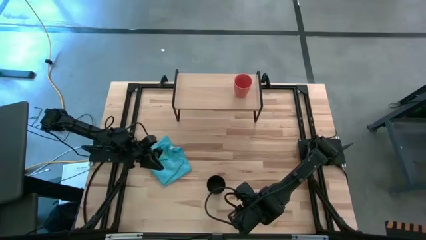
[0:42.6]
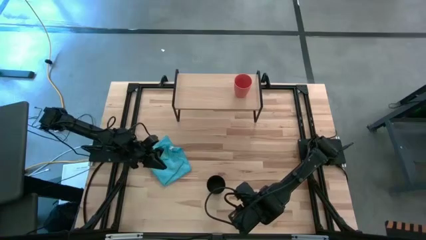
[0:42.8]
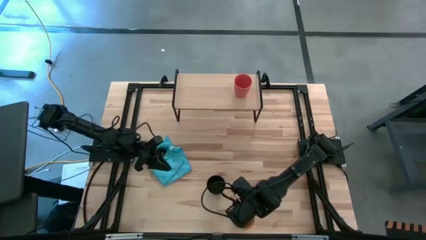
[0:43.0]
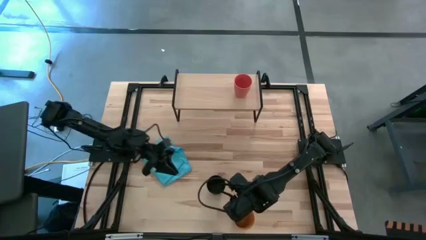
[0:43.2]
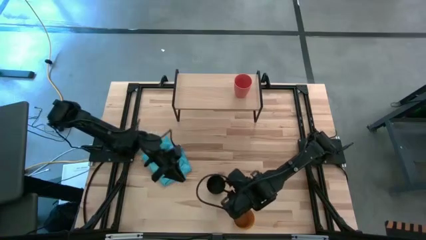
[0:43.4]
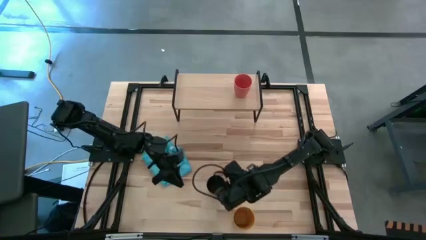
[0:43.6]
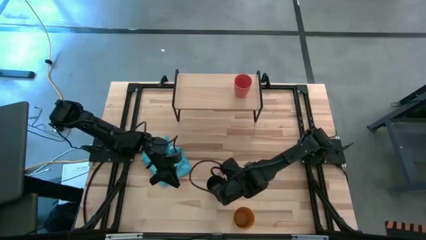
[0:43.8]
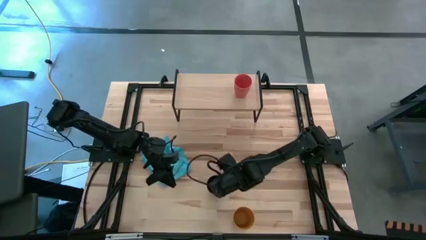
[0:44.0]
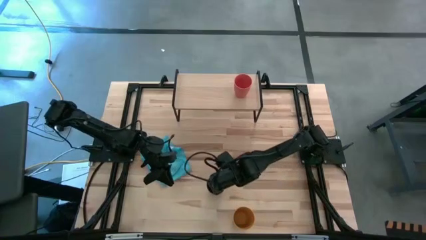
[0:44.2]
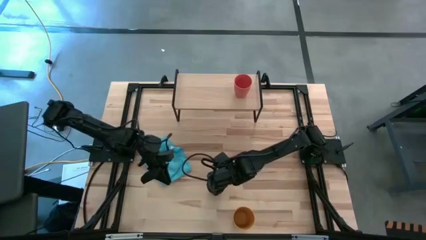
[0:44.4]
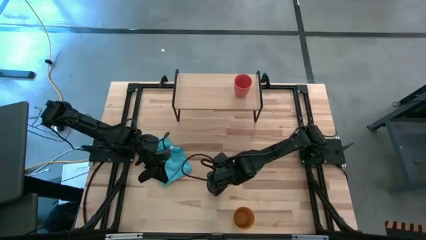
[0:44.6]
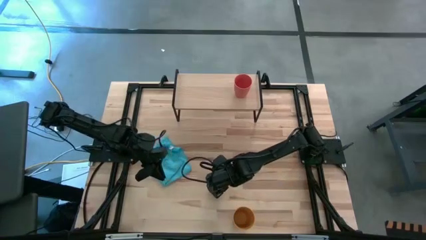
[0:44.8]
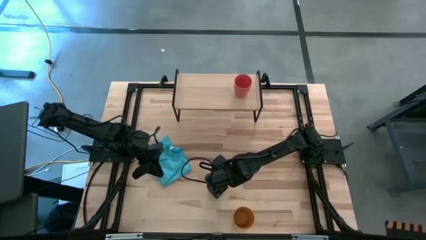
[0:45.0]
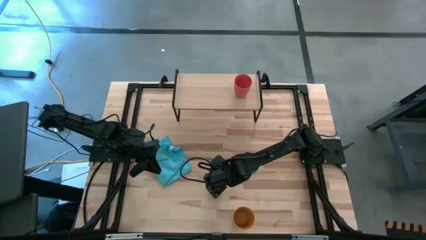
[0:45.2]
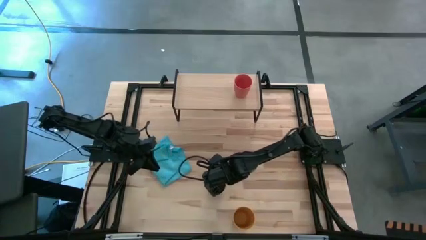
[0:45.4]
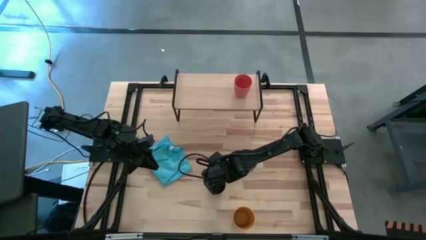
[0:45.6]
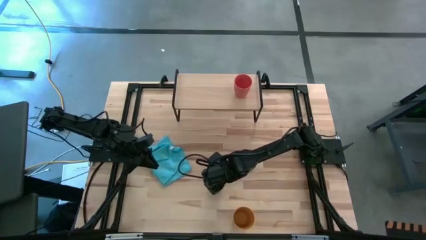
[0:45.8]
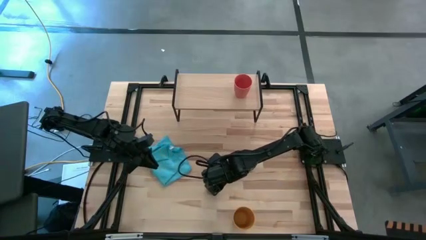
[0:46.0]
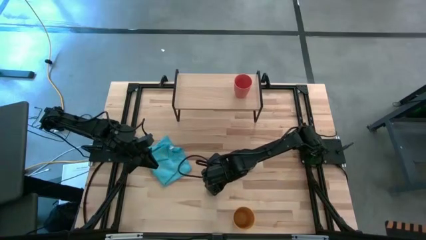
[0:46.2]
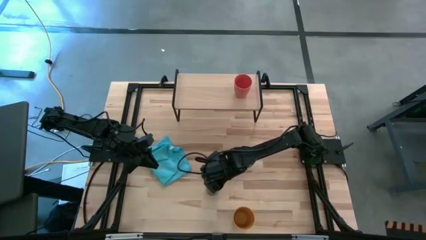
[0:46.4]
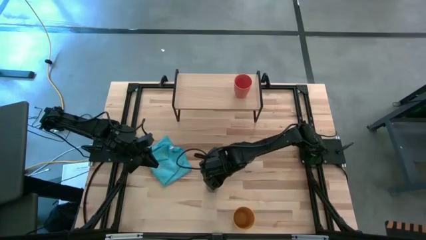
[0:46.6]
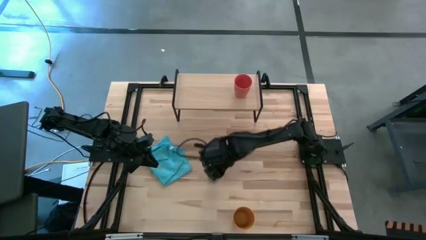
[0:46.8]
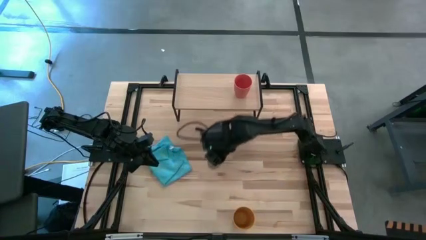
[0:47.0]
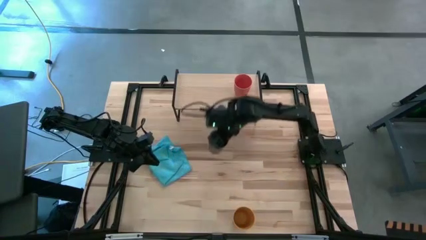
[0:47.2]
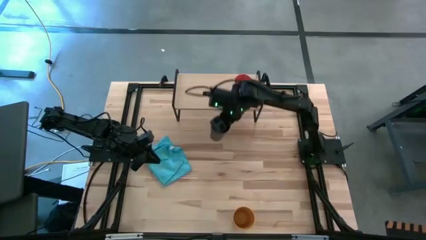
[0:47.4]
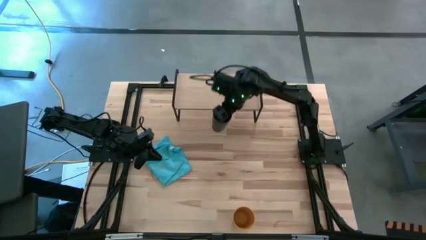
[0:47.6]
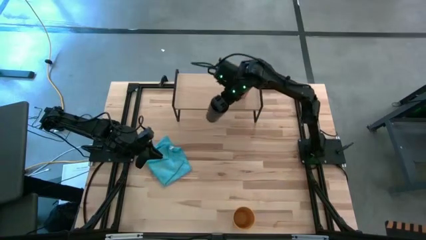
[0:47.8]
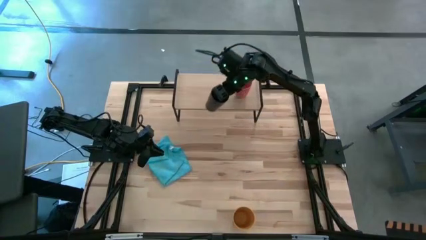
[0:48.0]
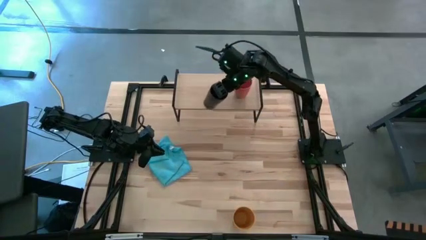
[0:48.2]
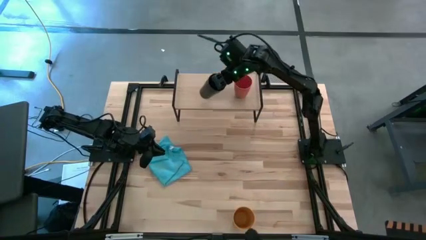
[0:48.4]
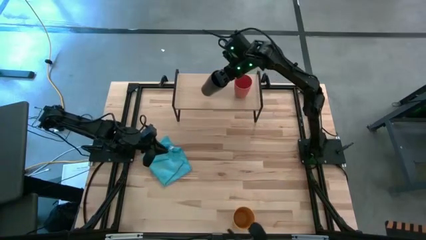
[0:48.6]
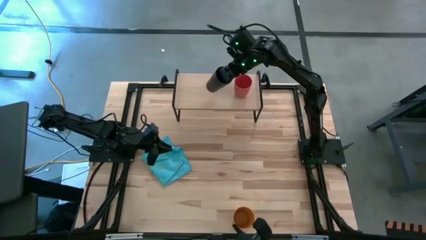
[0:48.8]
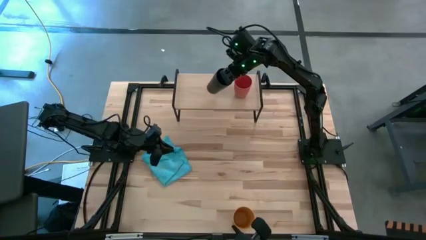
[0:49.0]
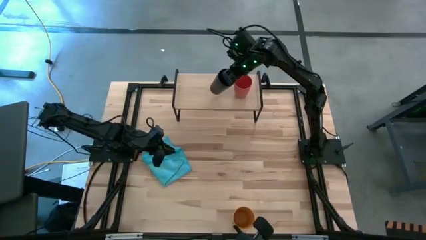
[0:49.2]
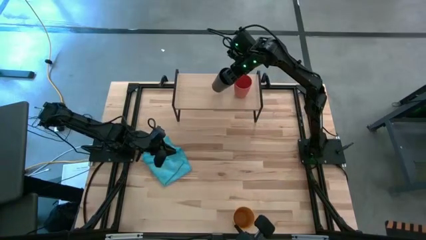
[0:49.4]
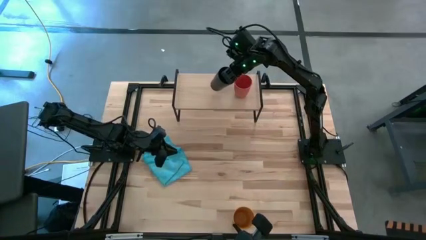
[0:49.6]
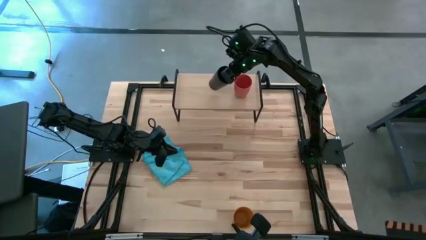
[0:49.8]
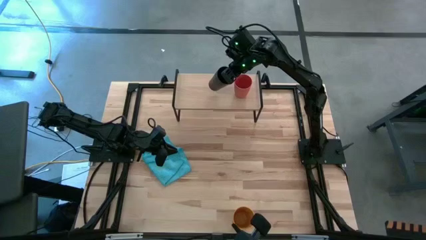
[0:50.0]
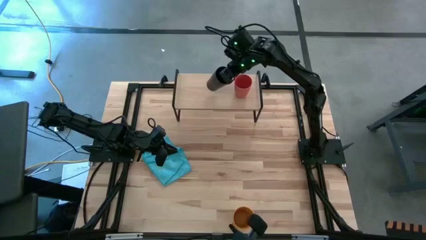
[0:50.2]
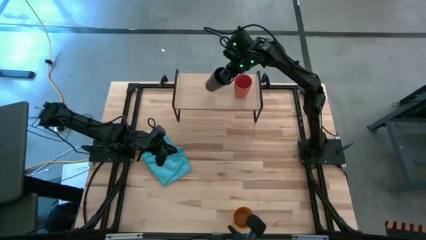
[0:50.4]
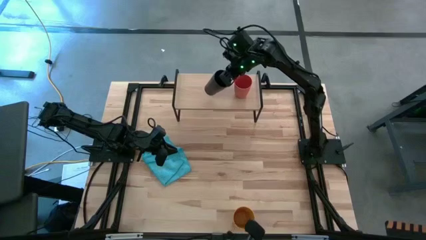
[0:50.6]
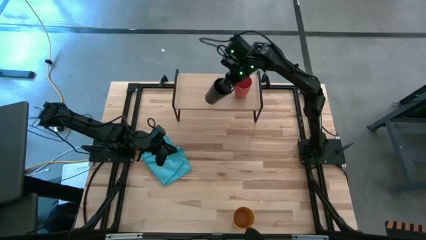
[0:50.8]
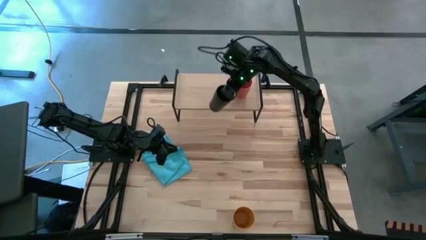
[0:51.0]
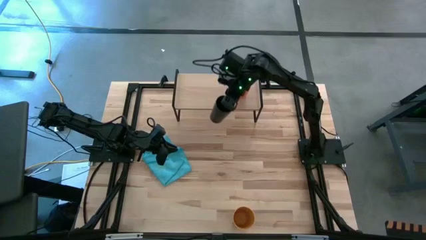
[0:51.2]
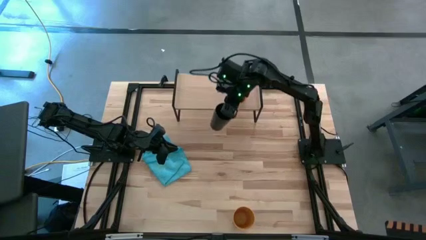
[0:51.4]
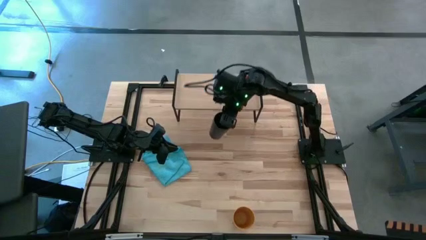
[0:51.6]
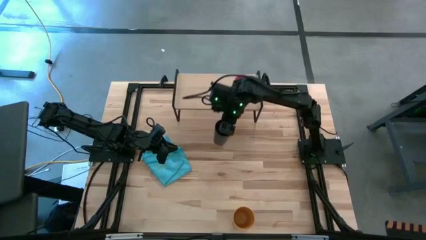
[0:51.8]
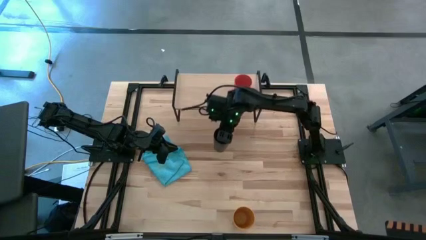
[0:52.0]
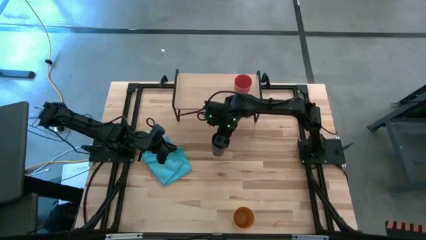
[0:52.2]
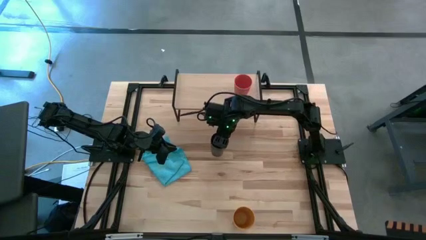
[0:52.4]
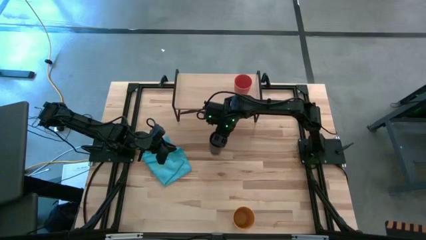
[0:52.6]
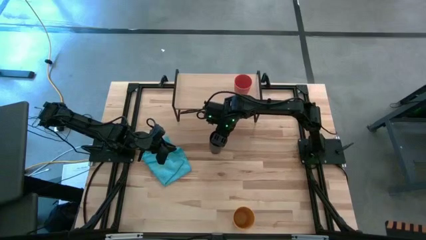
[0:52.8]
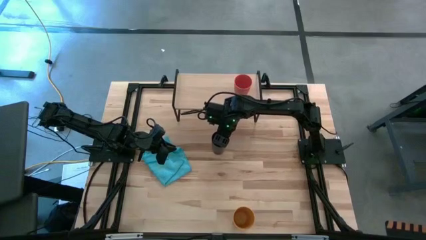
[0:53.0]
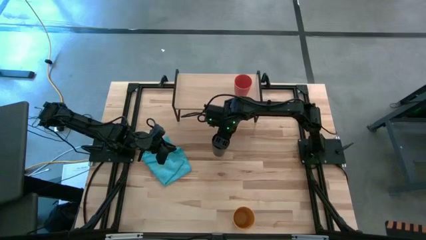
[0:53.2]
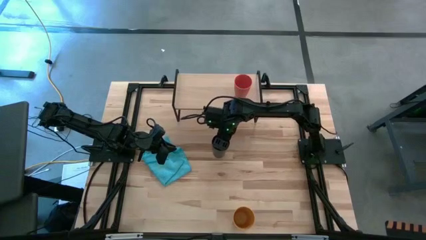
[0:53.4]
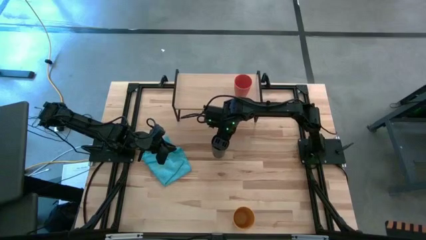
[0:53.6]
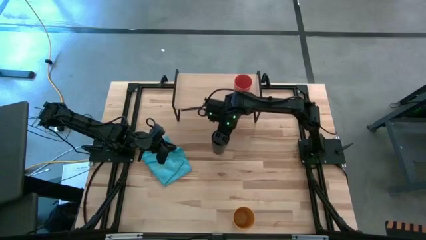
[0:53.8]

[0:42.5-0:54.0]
Task: Stack small to large cups/mugs on shelf
Put the black cup on the shelf

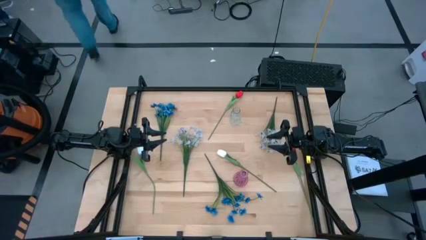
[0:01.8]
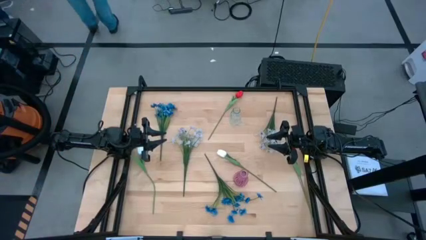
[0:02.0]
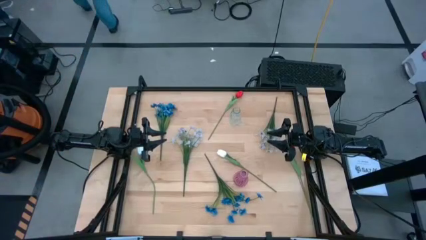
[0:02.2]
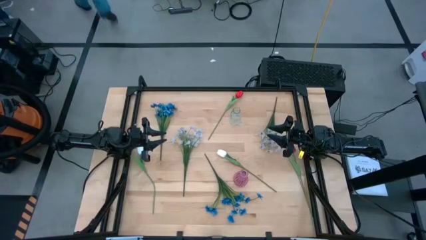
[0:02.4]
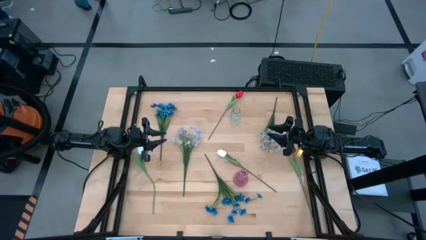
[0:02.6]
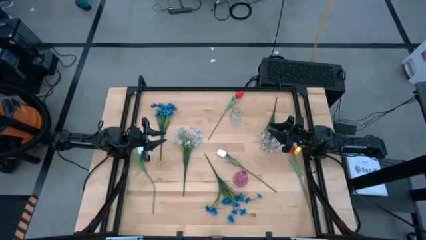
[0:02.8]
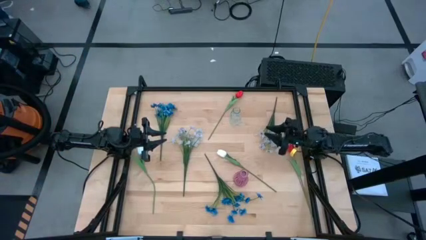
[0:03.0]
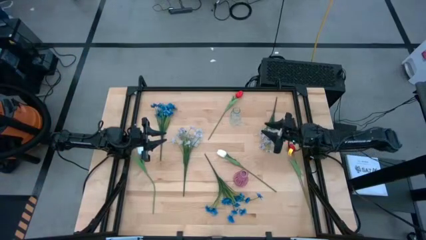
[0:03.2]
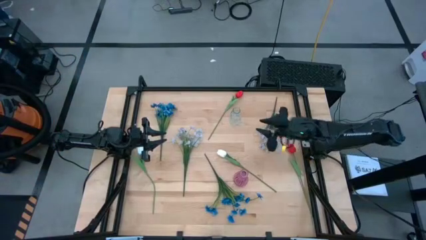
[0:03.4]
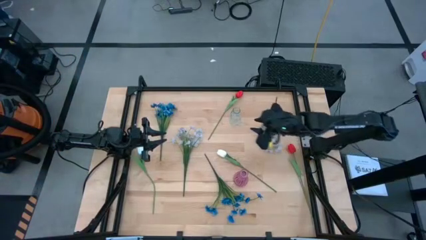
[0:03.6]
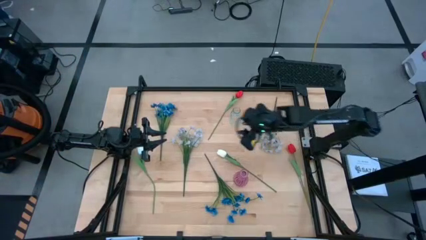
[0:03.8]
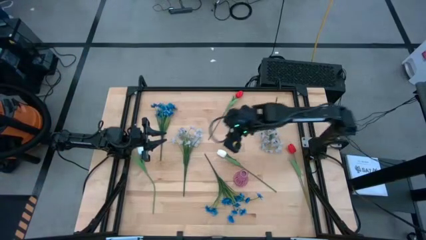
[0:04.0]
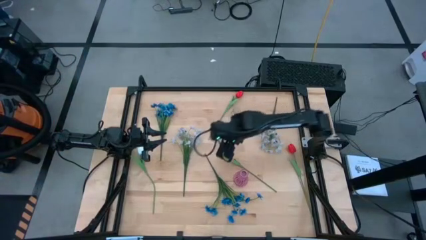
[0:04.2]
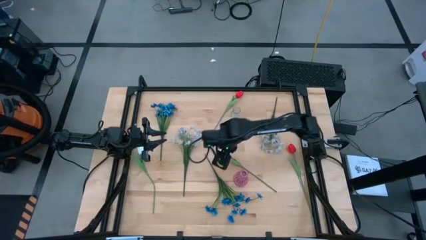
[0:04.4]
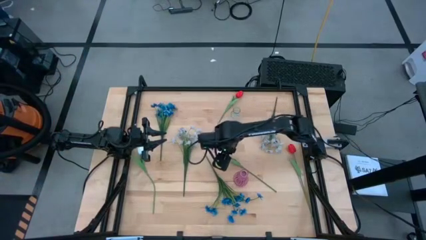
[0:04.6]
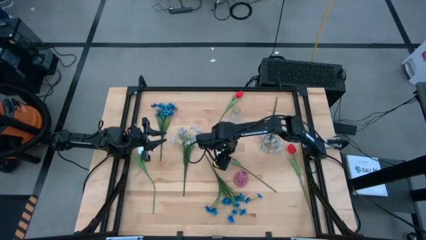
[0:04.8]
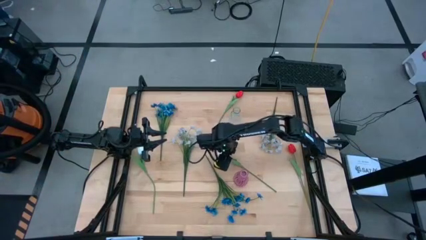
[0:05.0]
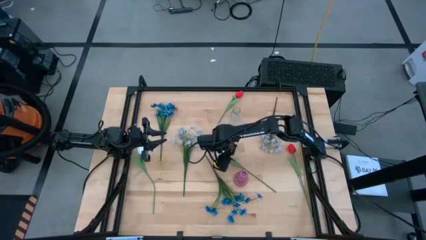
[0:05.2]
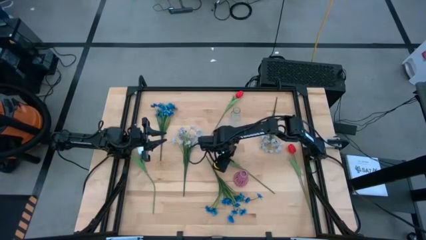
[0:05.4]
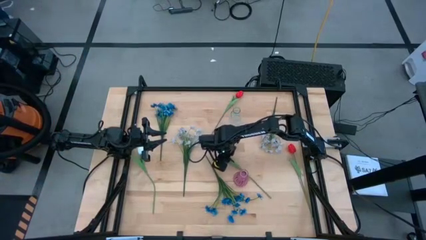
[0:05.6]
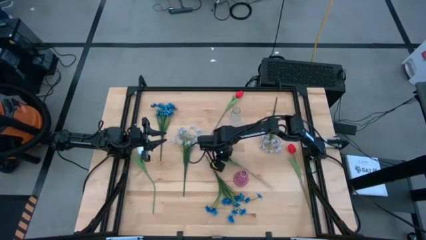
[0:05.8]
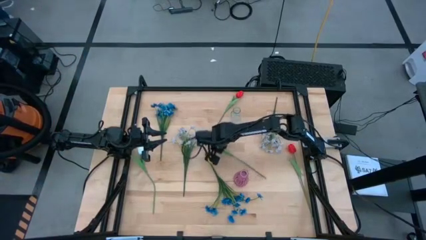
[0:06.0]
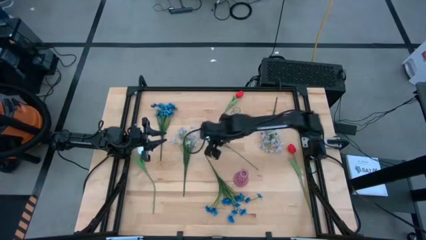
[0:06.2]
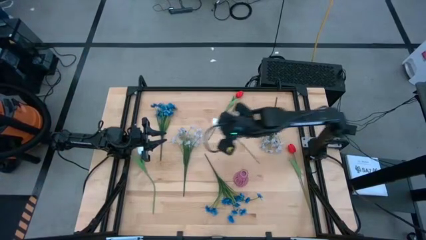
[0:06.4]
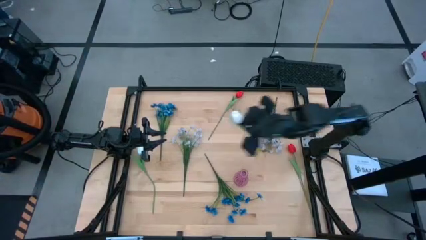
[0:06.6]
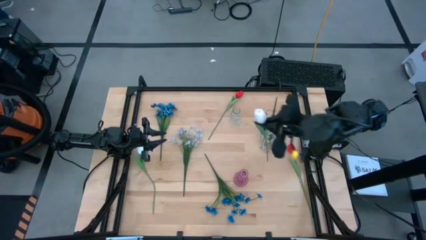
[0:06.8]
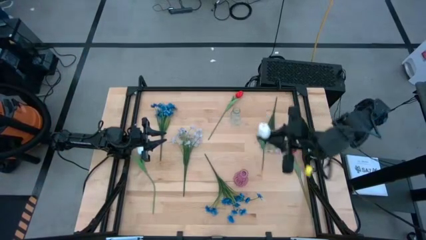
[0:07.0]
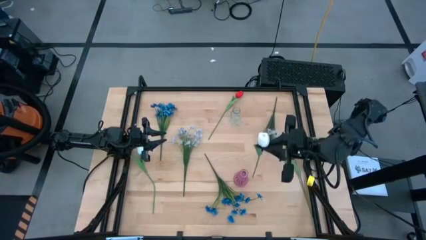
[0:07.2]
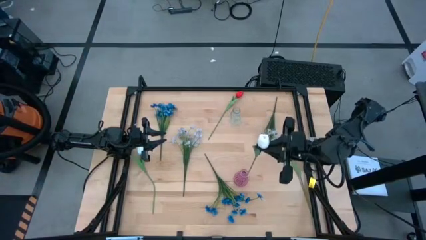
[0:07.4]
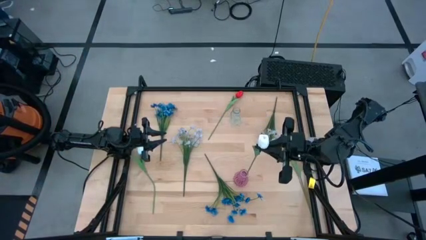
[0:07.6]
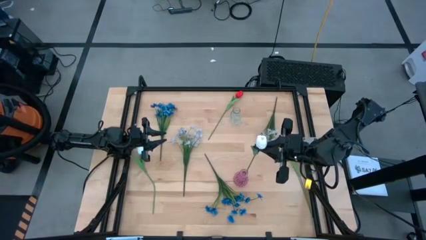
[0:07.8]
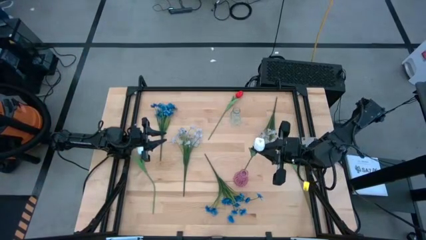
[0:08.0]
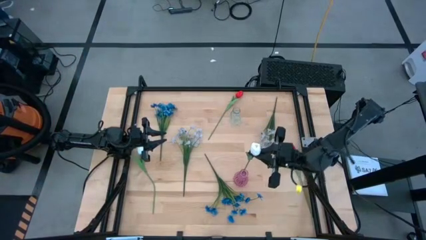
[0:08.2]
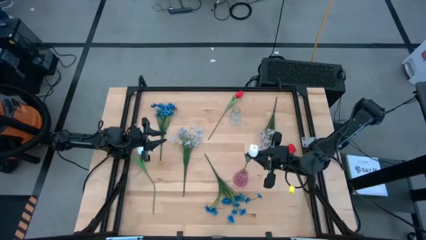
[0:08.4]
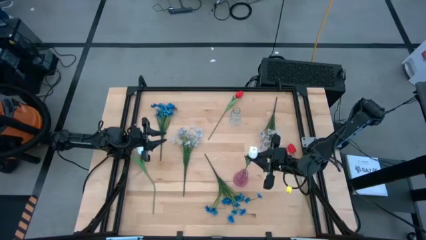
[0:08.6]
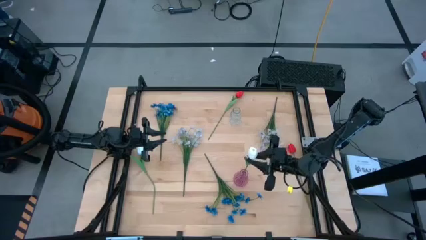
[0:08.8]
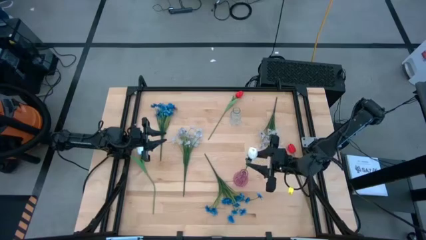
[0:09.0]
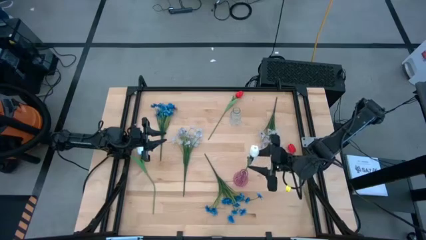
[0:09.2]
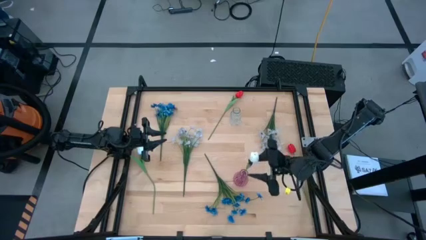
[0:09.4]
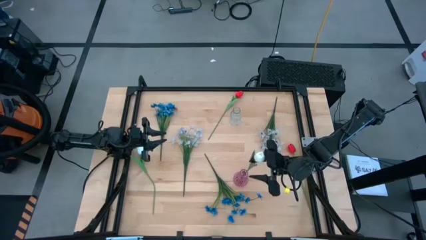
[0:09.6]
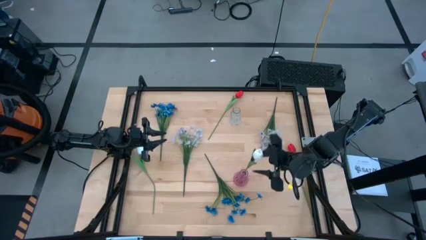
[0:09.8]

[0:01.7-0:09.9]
Task: Sort flowers into vase by color
Put the right white flower into the violet transparent vase
